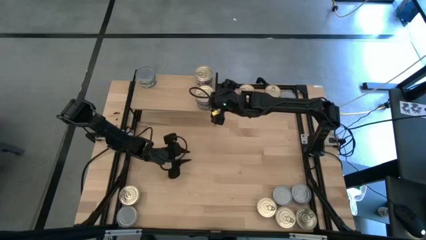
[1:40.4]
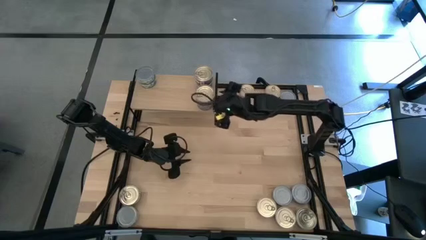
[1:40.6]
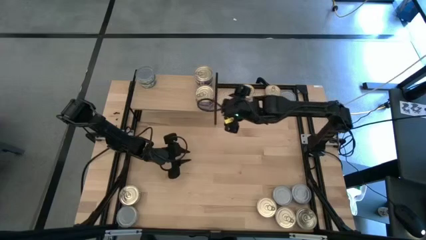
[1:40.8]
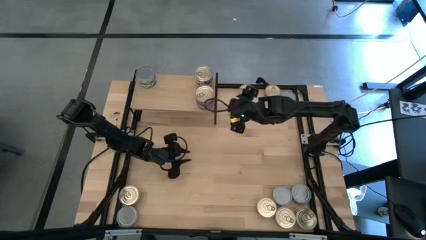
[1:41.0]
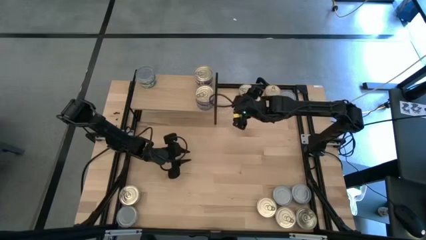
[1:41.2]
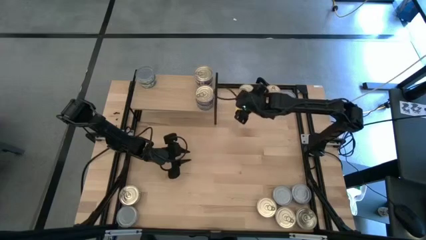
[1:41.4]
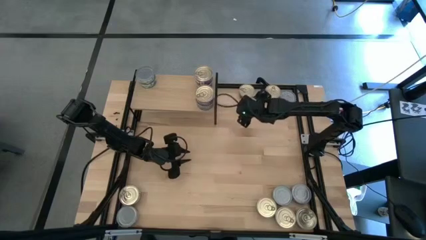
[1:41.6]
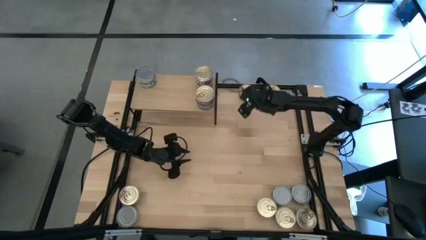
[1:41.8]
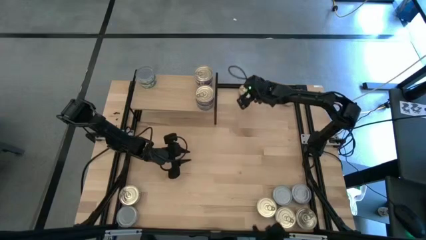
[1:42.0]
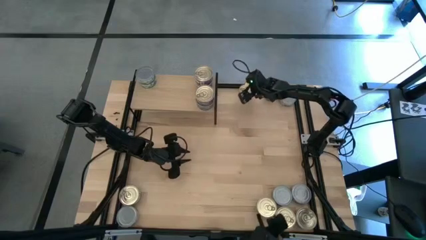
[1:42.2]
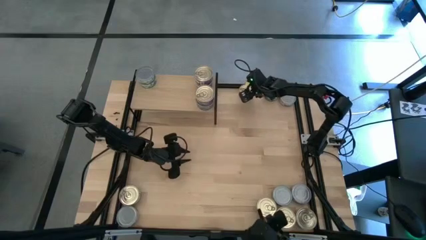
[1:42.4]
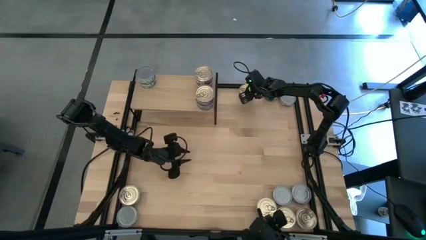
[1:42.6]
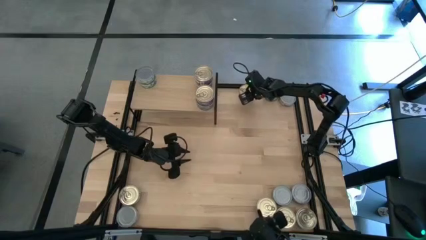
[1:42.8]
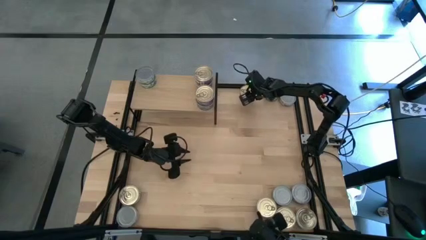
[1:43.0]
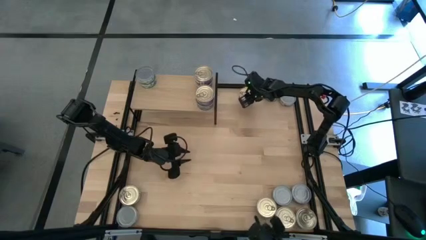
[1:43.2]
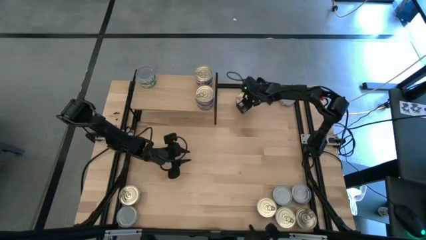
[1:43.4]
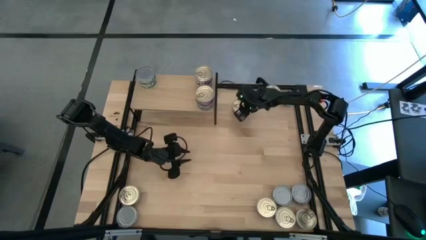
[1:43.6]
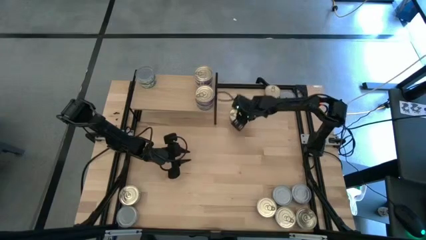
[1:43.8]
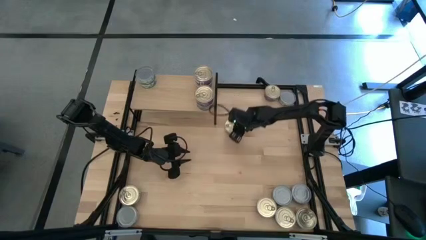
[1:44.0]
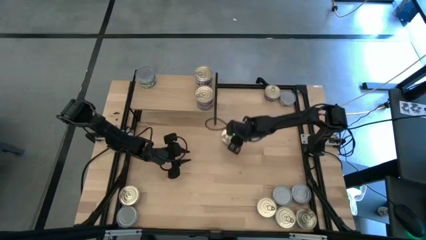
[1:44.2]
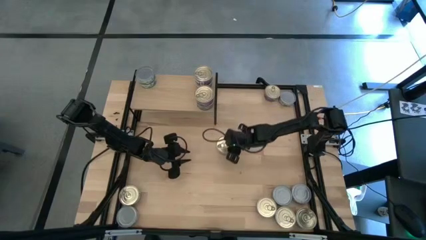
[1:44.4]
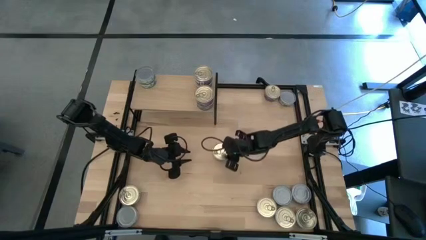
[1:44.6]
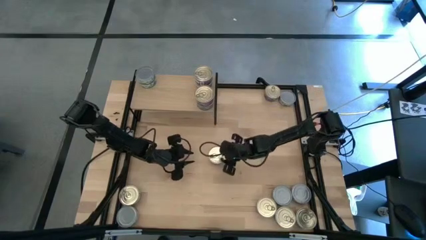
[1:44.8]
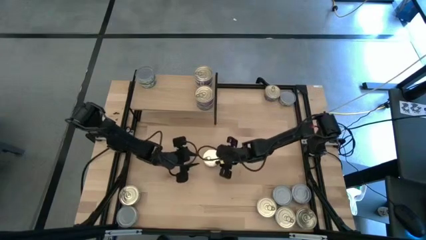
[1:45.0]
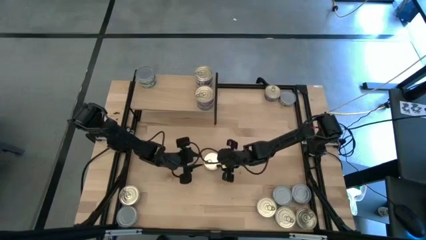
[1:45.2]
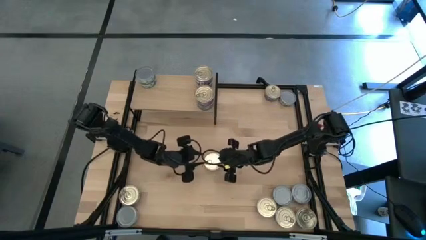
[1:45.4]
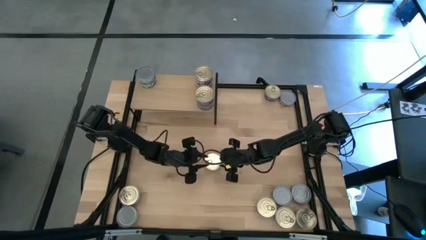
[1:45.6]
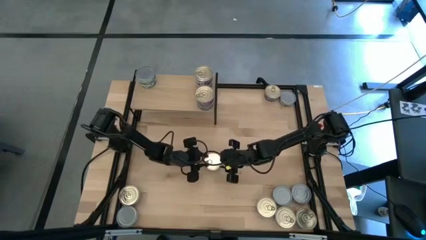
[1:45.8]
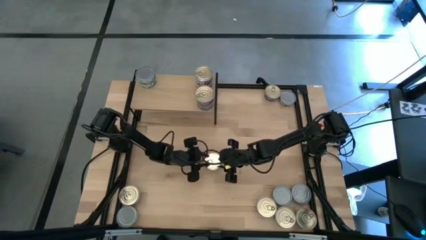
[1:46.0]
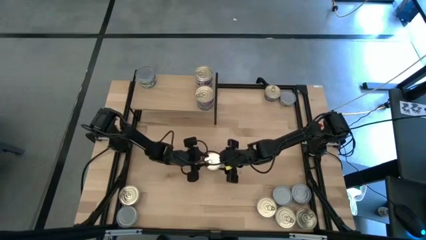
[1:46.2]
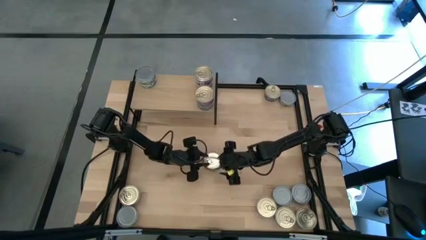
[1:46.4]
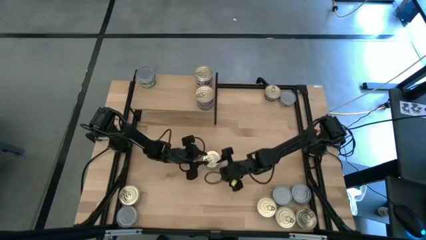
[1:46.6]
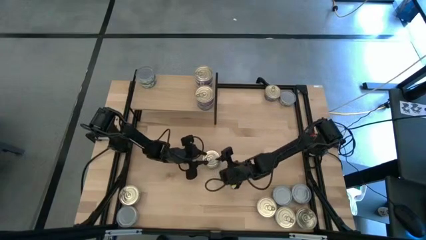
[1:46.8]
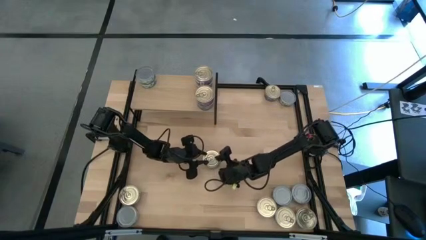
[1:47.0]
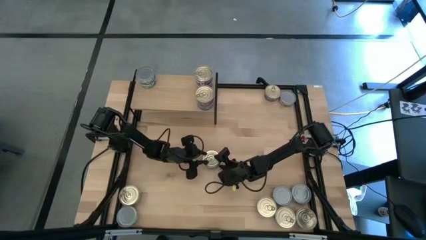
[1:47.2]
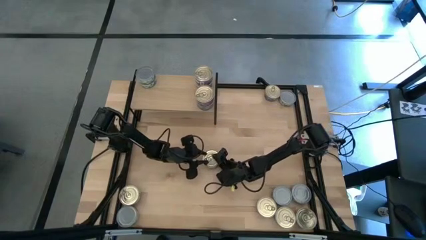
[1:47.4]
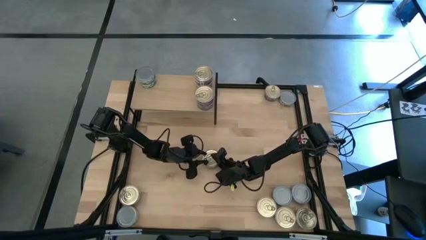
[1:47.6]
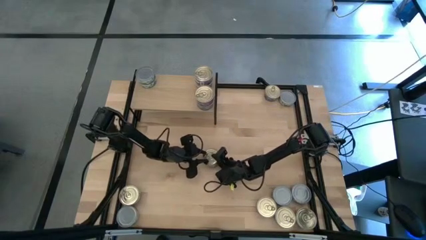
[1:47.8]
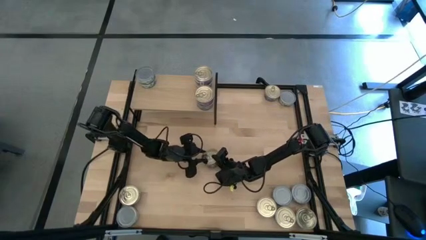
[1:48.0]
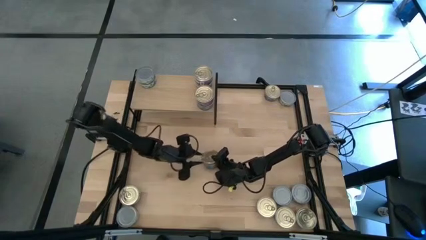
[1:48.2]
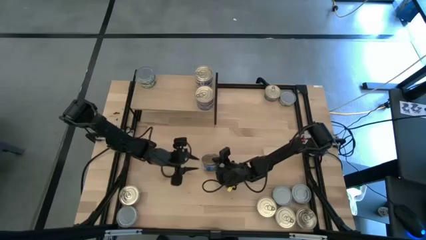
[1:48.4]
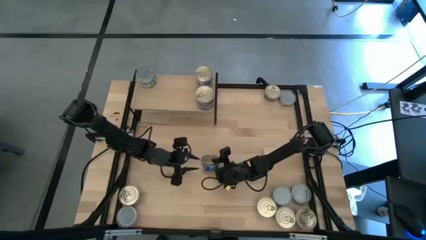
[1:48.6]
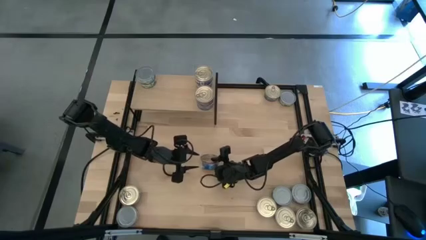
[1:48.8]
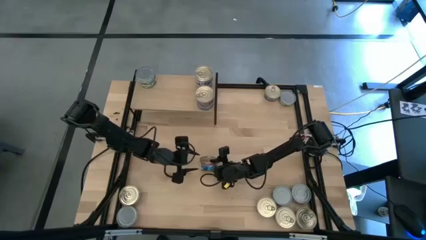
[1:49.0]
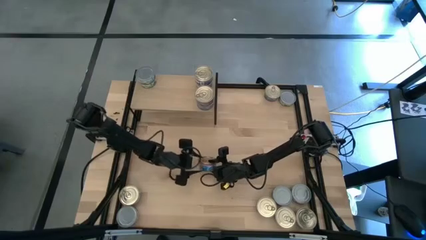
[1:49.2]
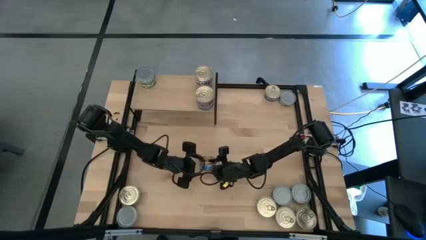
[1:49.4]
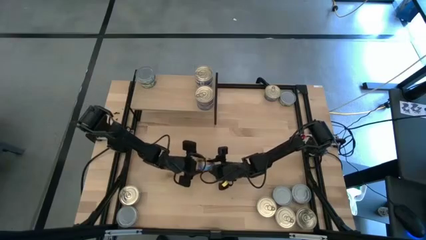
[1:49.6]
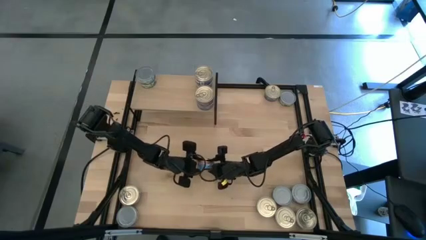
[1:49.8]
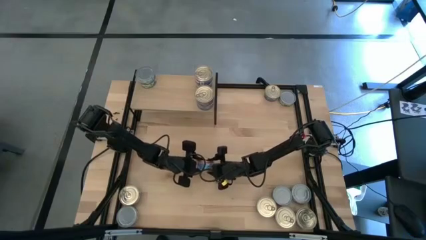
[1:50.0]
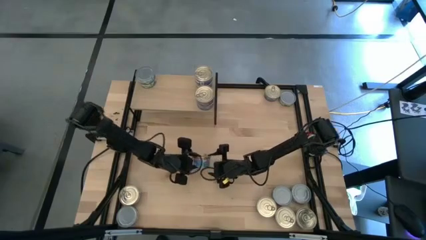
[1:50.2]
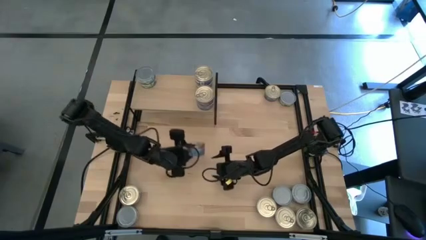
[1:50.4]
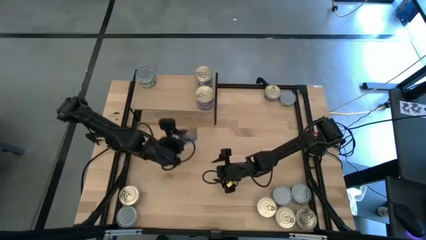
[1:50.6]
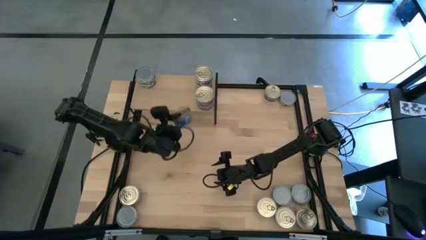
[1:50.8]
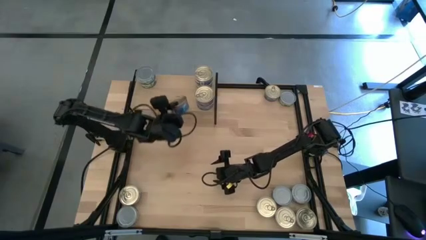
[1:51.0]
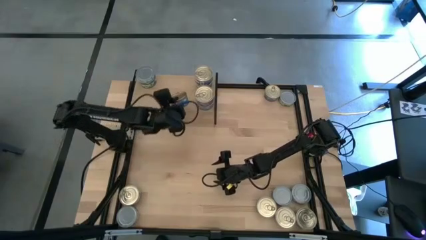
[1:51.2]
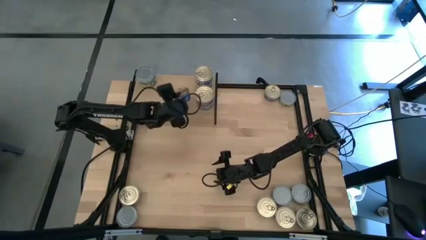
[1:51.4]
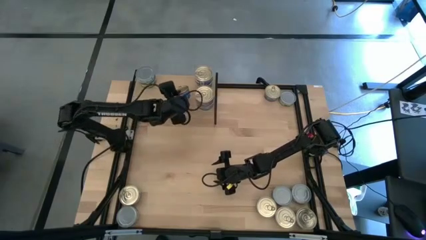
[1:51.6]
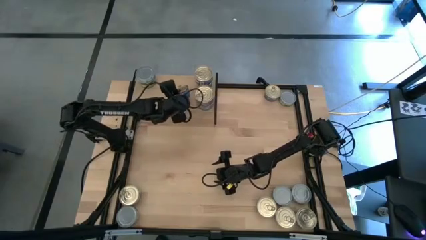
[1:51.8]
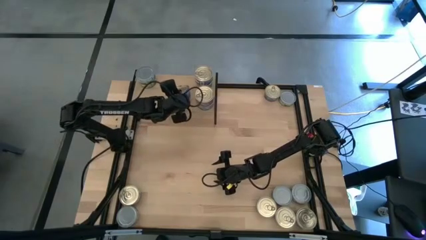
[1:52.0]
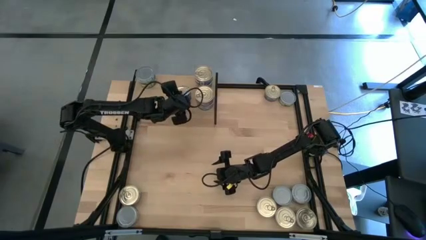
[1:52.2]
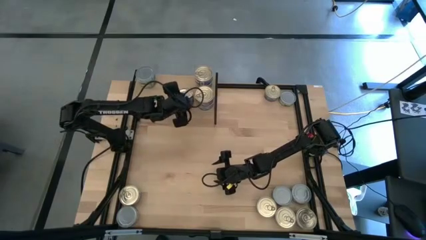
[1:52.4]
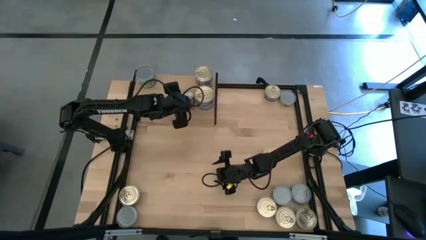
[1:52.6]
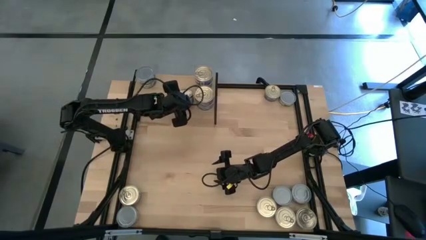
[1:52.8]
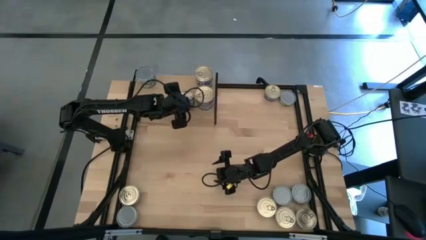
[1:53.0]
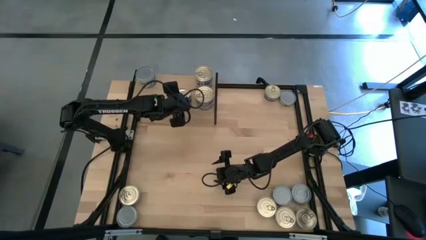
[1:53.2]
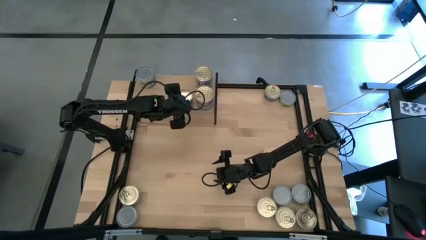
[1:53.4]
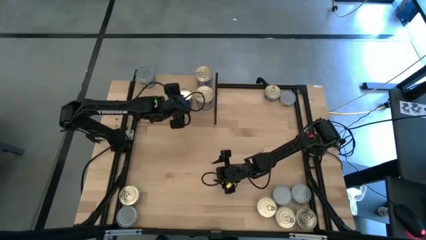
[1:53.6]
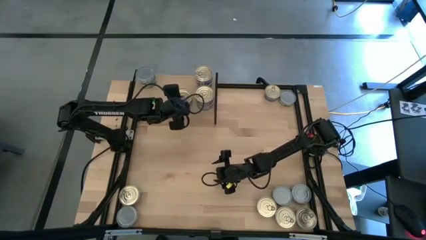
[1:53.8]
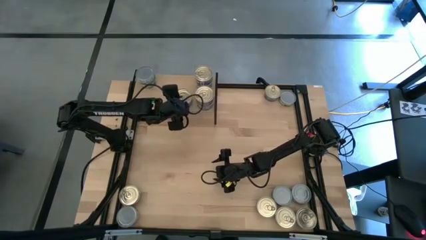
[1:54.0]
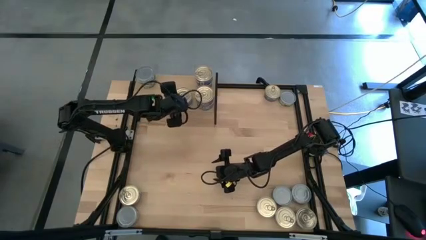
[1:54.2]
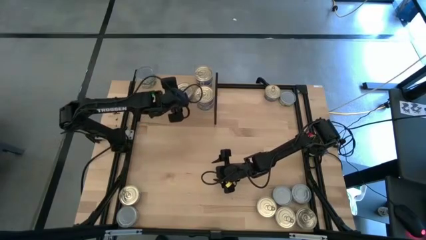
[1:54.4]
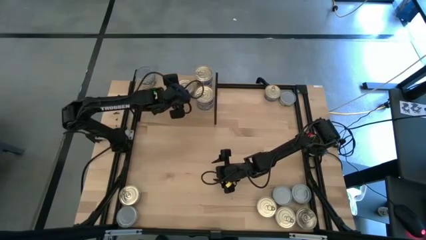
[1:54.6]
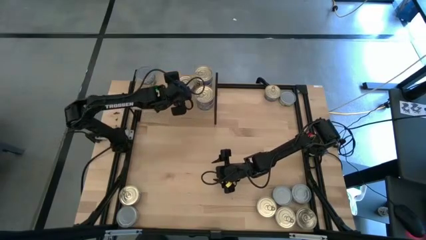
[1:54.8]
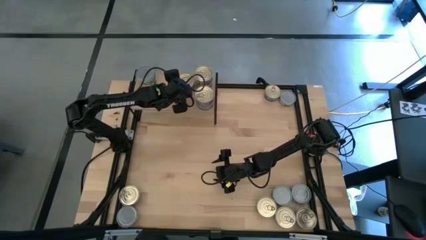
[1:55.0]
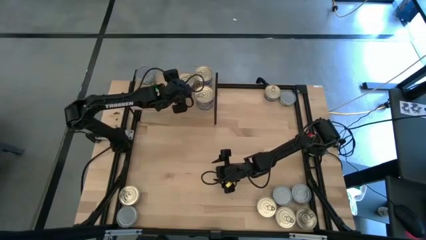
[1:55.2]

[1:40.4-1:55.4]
Task: Stack canned seafood by type on shelf
Put the blue tuna can on the shelf

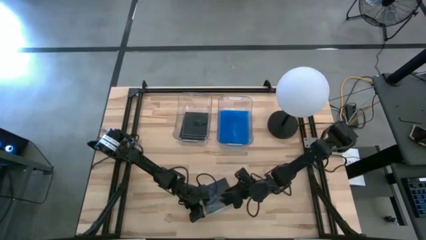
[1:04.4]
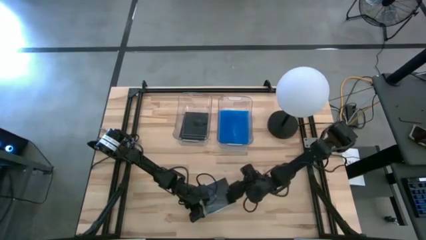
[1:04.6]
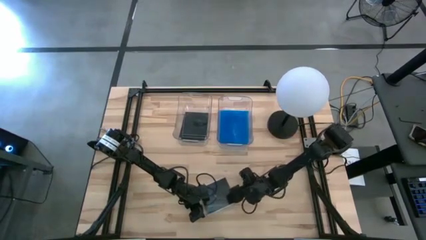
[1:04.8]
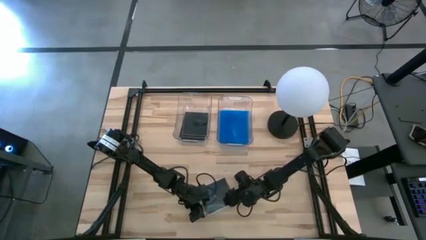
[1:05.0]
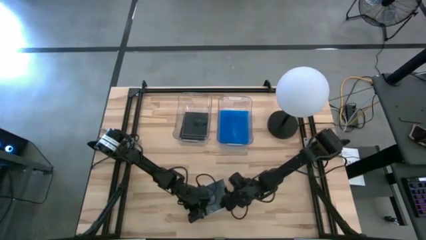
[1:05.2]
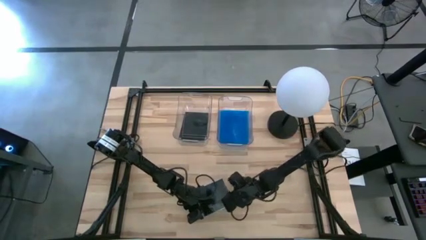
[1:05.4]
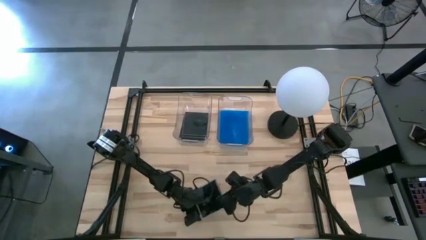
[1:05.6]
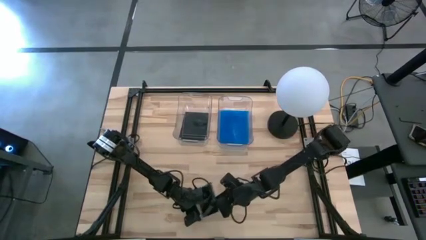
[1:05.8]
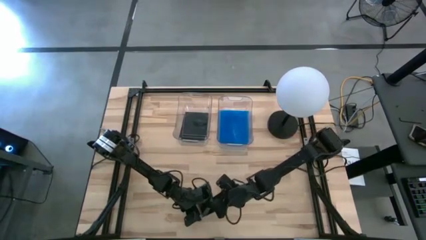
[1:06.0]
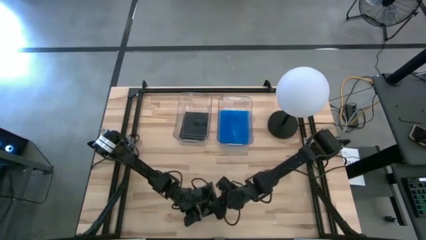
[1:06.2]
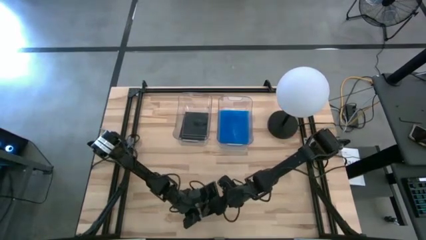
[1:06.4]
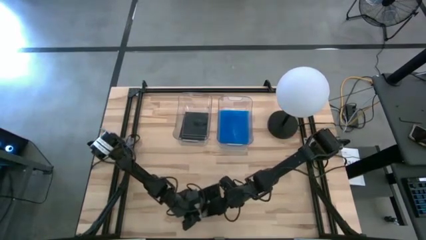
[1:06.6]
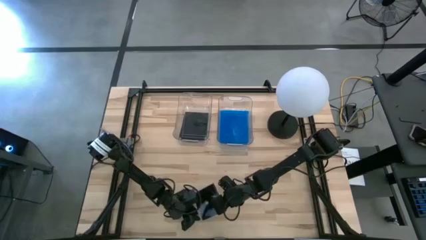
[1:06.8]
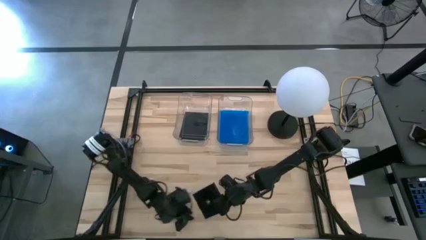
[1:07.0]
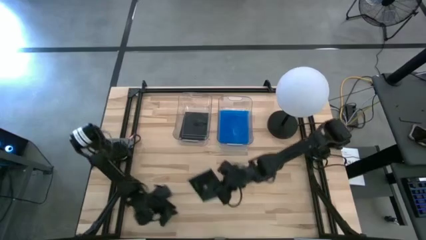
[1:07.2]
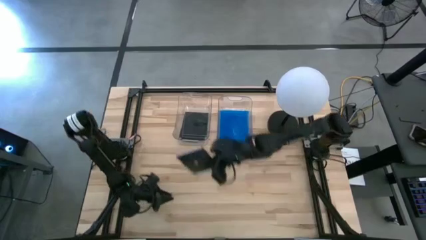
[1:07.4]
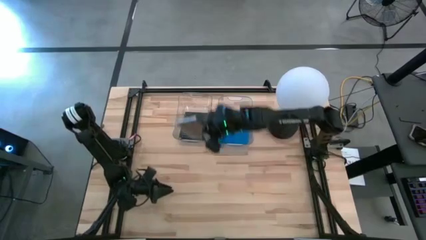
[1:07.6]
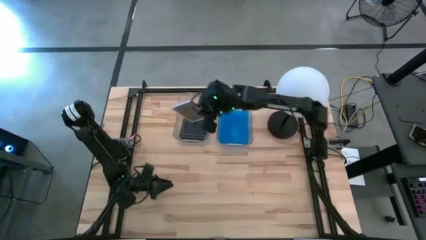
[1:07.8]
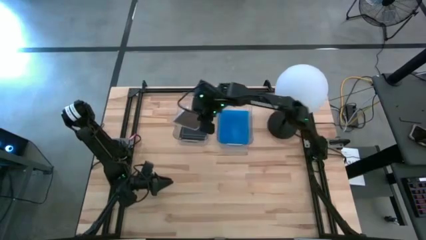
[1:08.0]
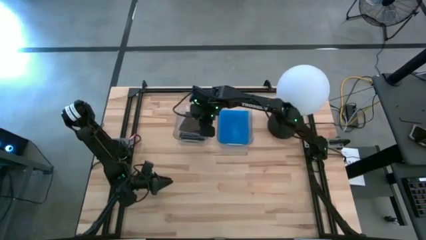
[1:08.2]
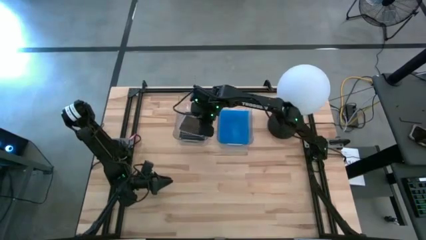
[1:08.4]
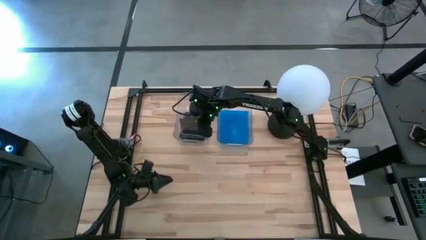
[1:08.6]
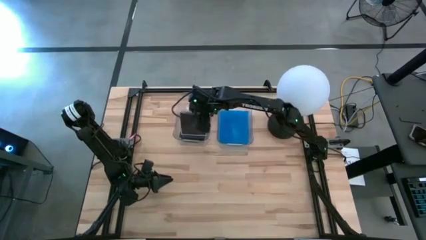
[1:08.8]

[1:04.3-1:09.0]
Task: Pick & place jewel cases by type
Put the black cd case into the left transparent bin
